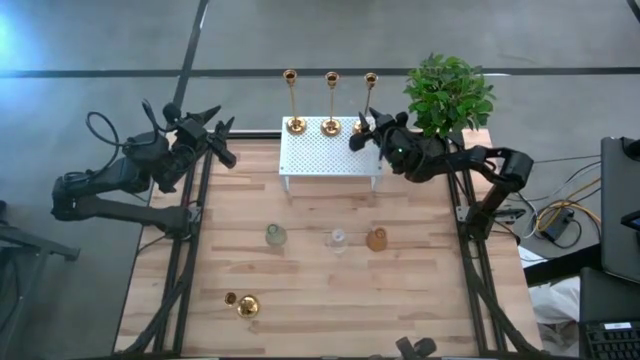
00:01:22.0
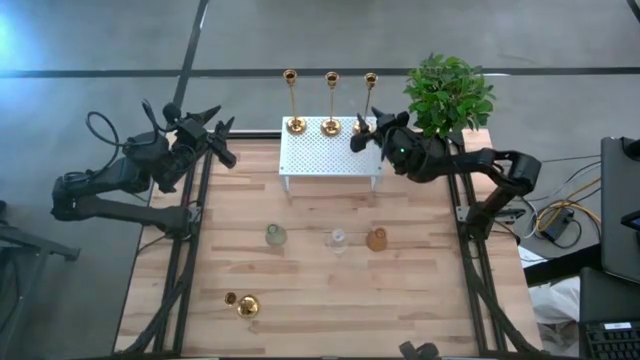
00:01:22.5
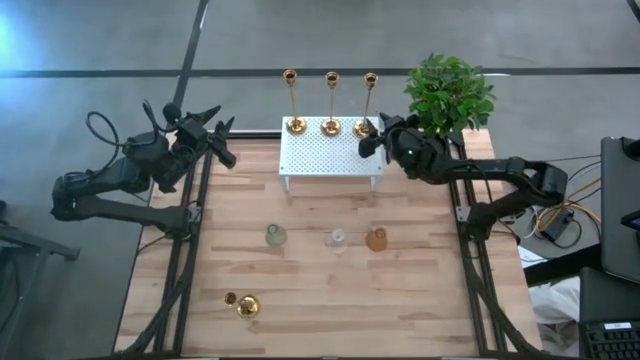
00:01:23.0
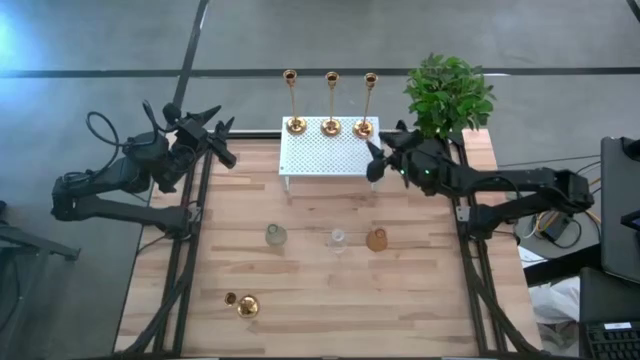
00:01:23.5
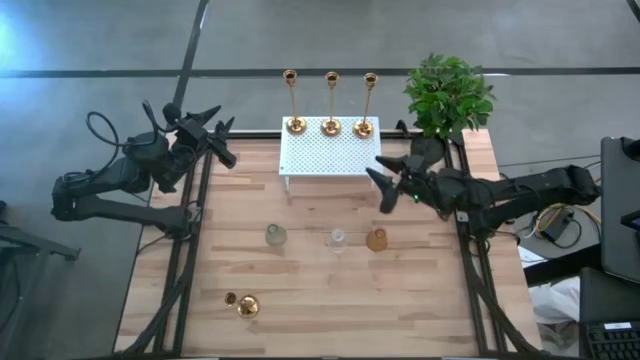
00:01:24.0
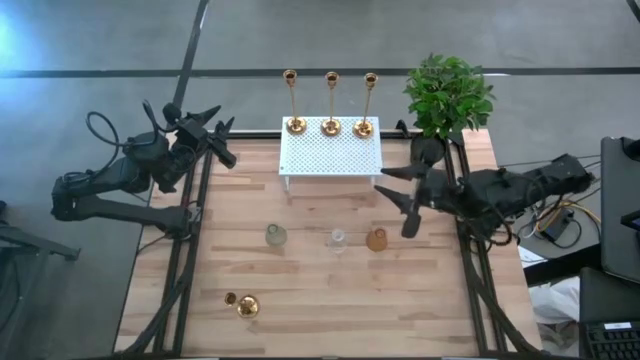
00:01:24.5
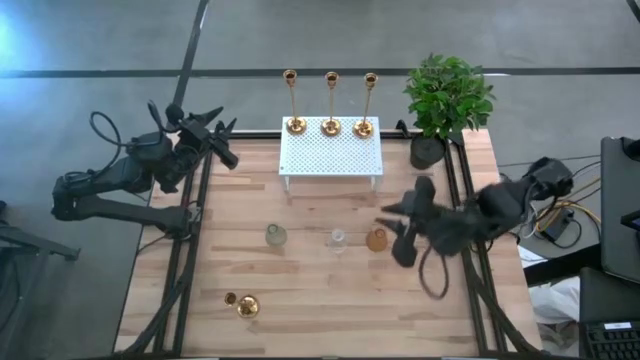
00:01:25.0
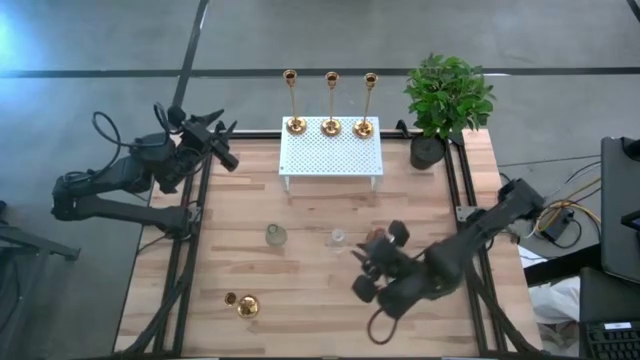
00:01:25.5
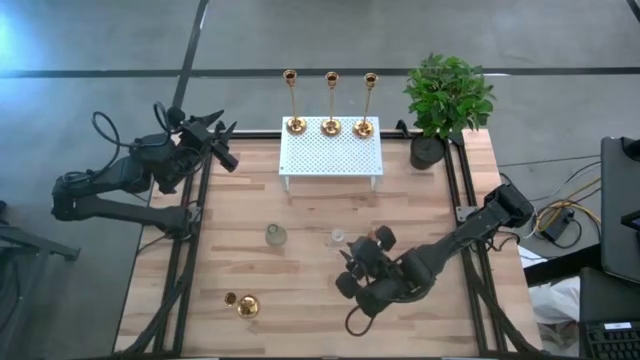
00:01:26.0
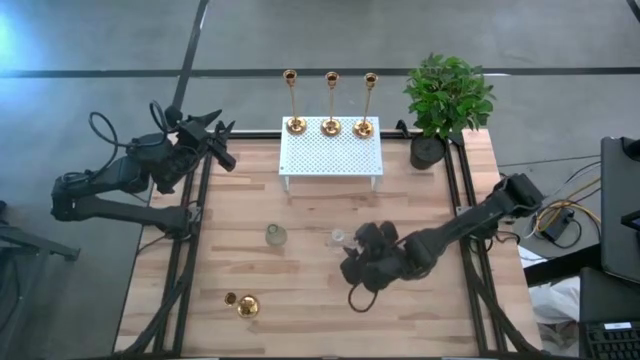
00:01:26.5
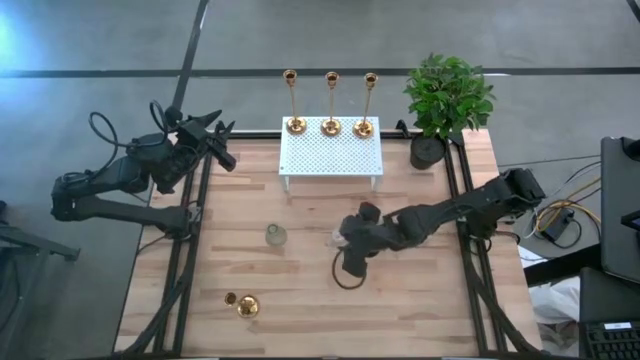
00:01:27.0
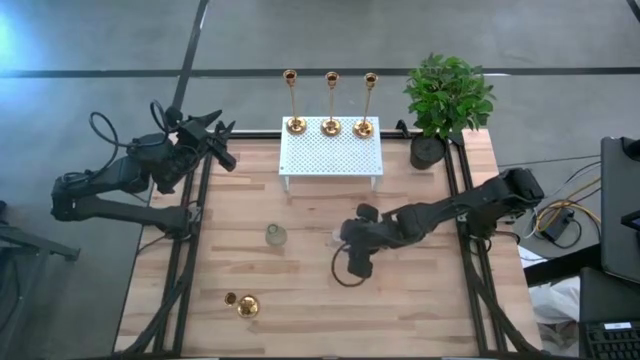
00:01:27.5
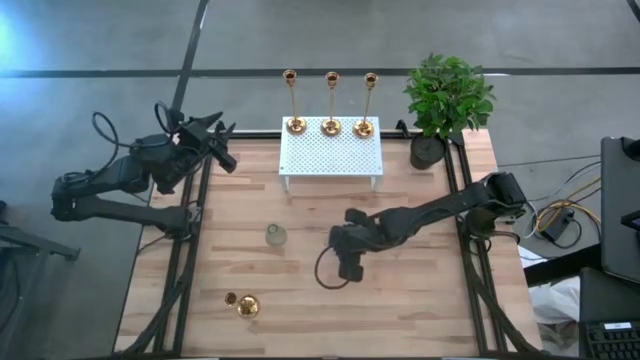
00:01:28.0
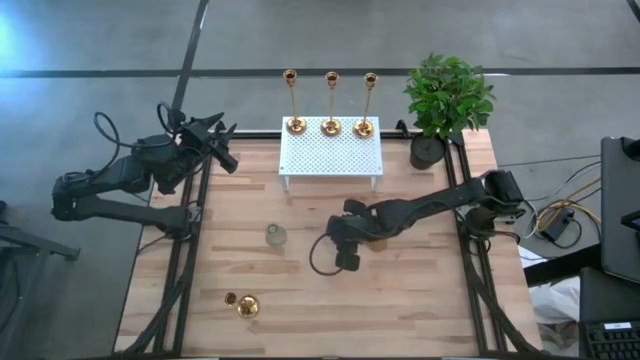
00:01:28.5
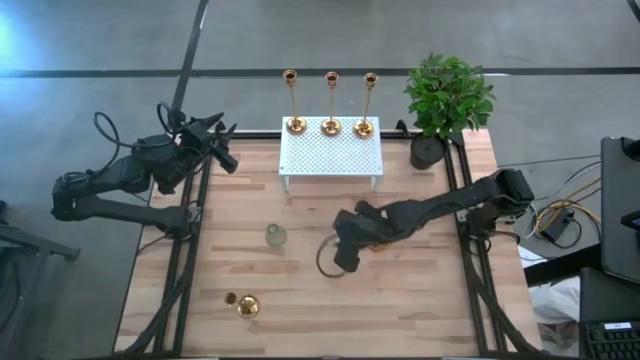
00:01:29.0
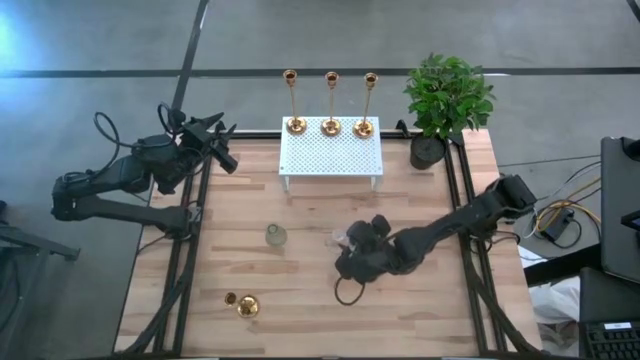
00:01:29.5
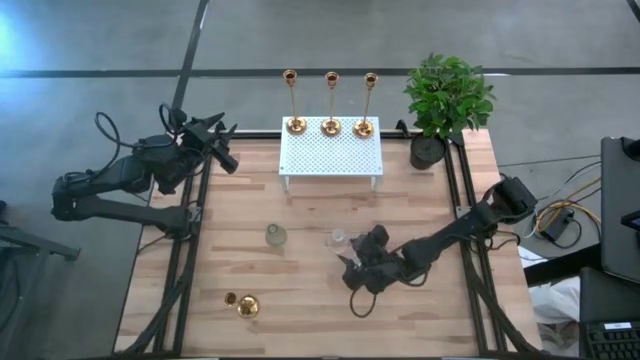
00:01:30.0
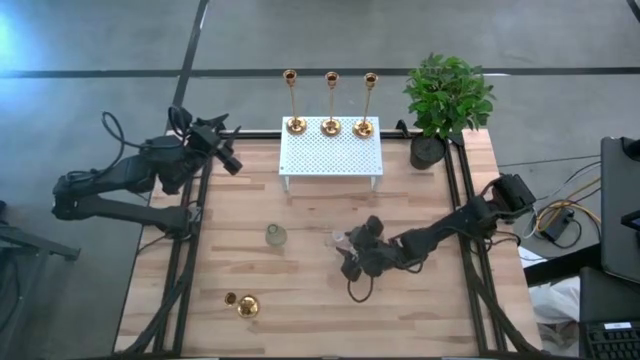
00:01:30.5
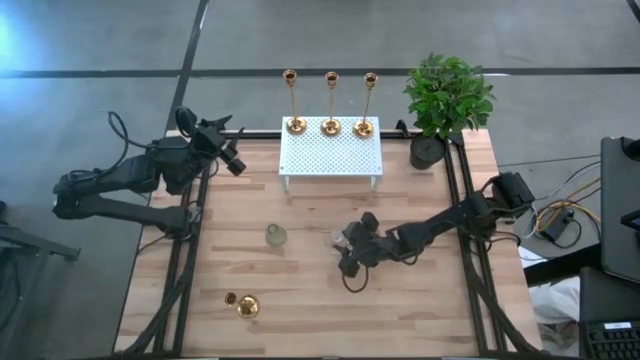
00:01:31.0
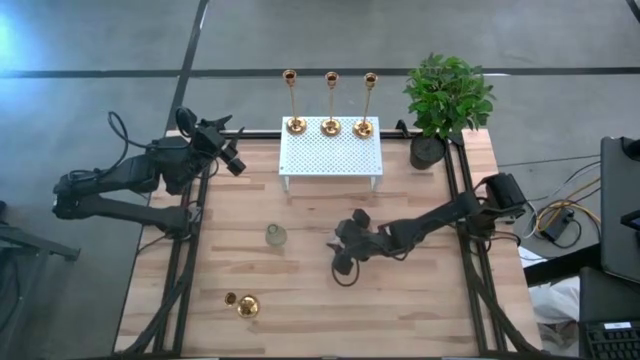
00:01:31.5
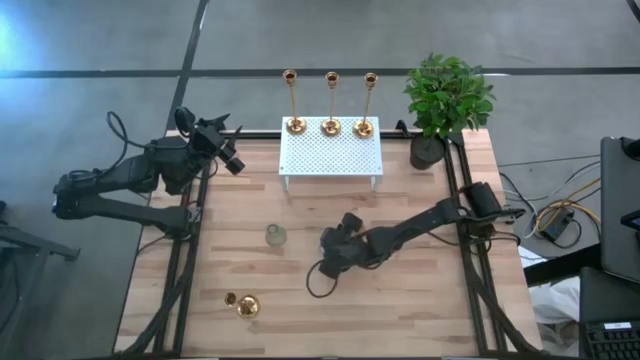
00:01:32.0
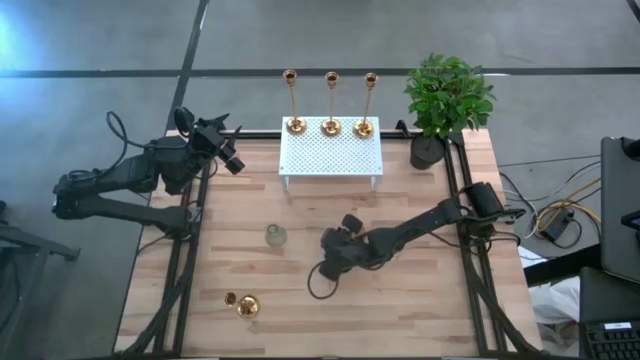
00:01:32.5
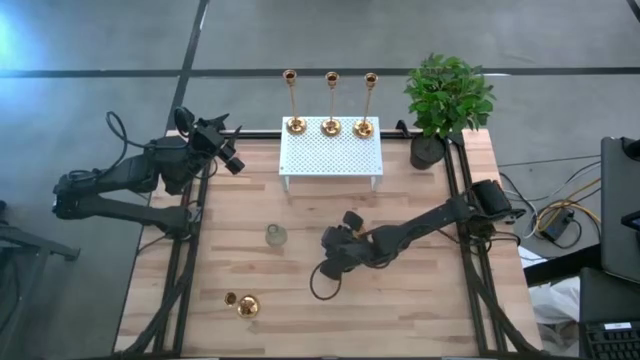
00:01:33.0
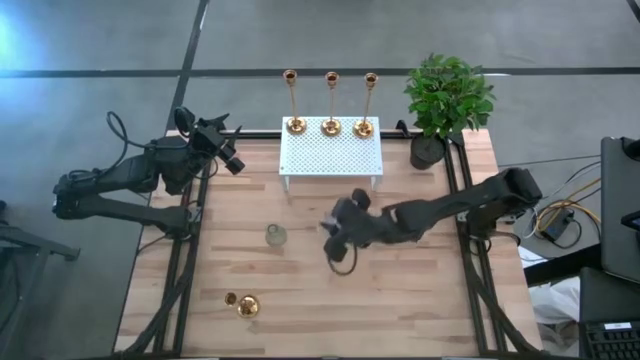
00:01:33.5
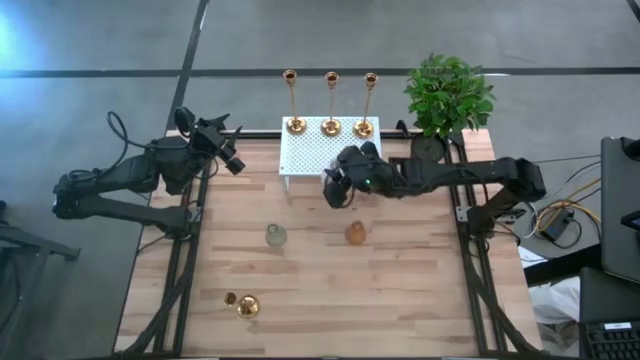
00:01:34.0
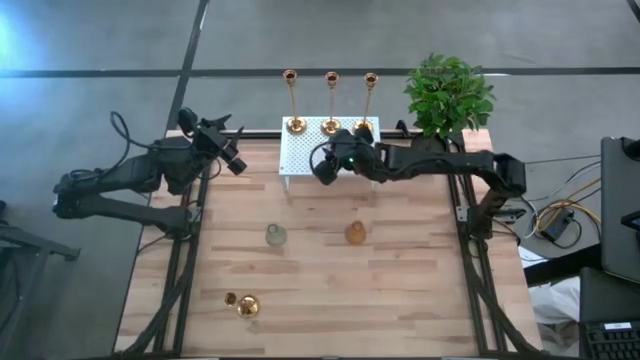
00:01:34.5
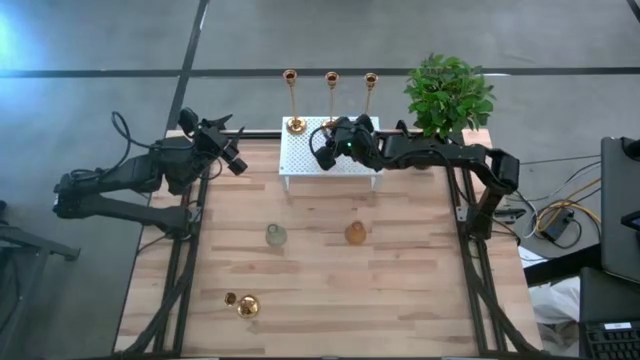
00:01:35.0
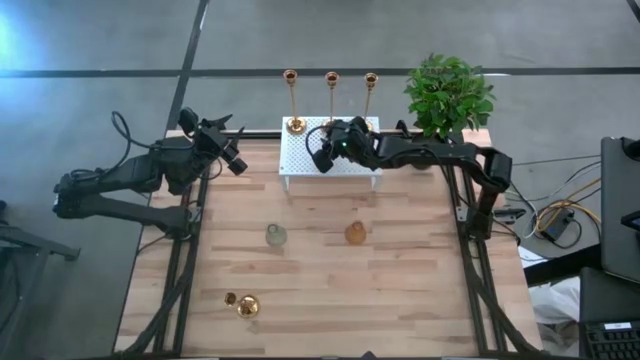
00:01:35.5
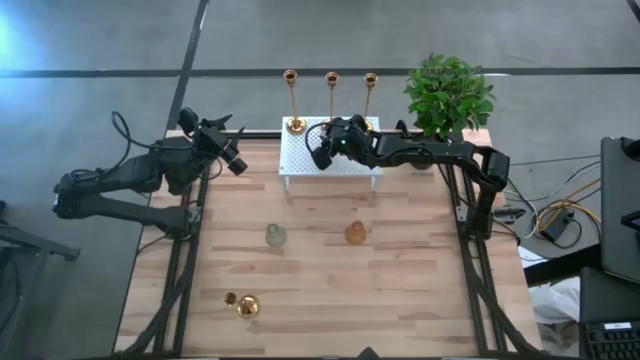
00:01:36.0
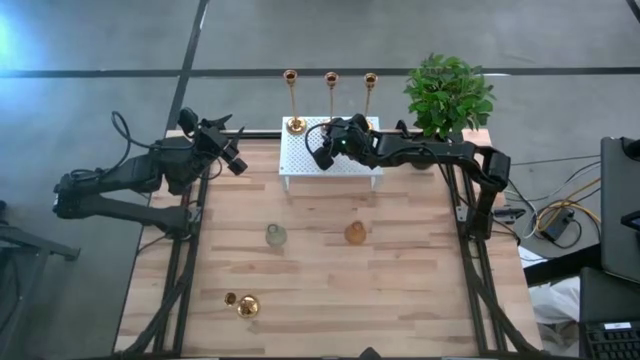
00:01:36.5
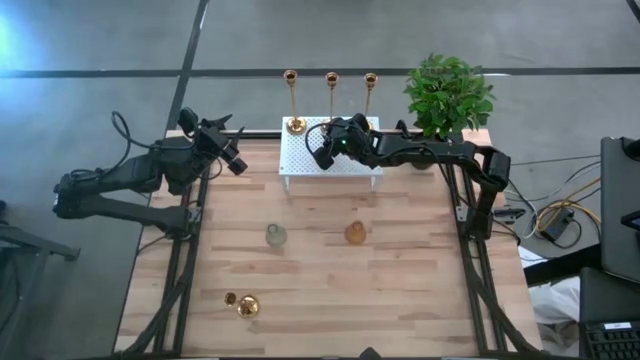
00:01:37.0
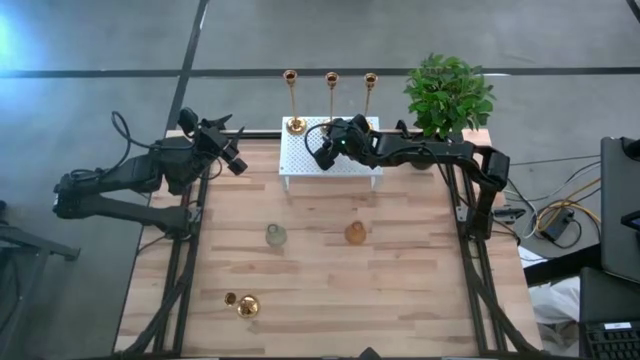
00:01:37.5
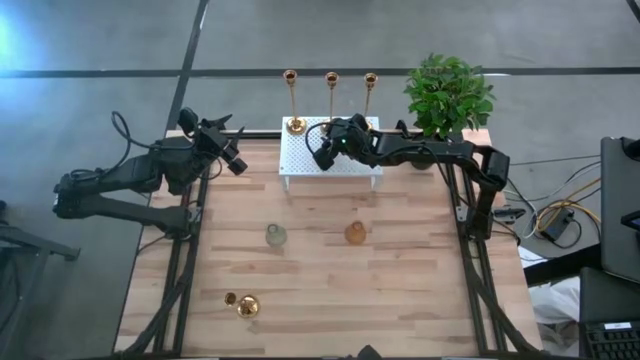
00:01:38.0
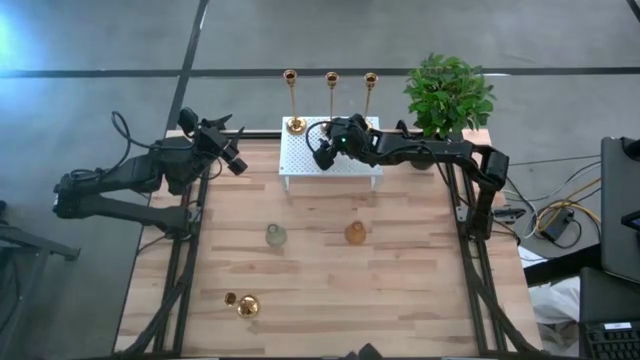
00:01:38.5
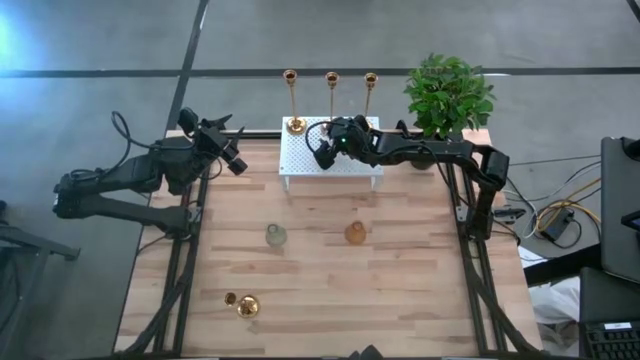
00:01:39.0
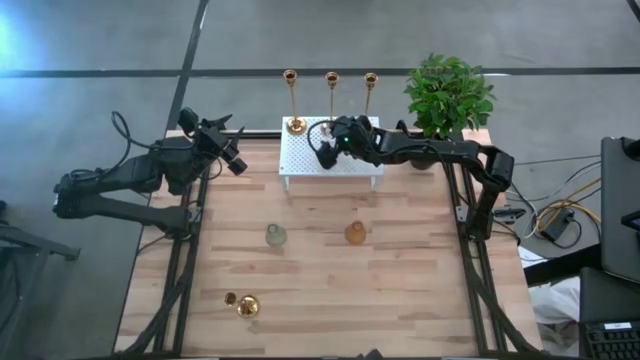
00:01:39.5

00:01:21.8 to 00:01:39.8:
Task: Pick & Place candle stick holders
Put the transparent glass candle holder on the shelf

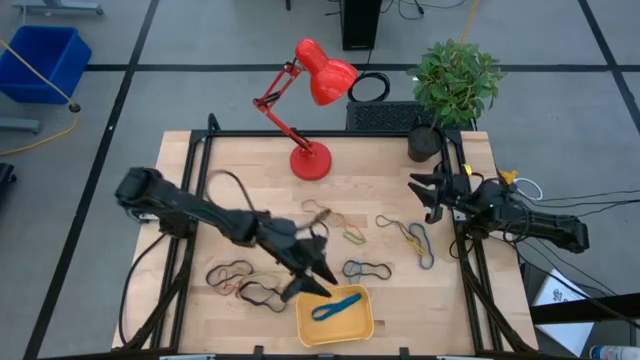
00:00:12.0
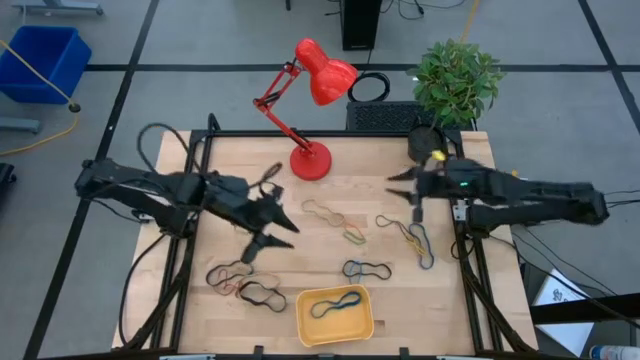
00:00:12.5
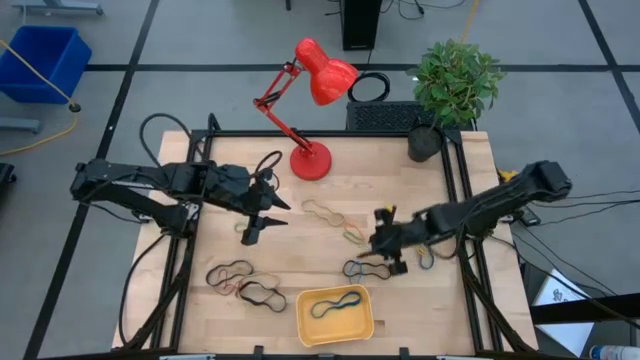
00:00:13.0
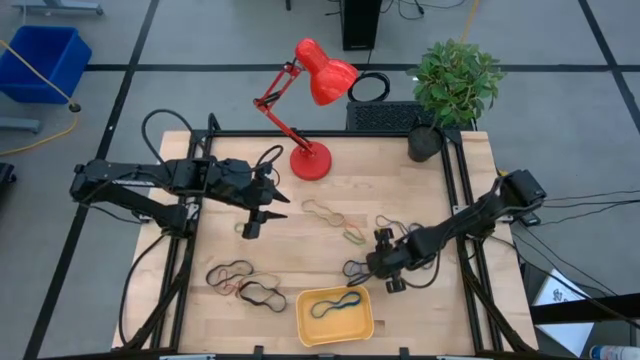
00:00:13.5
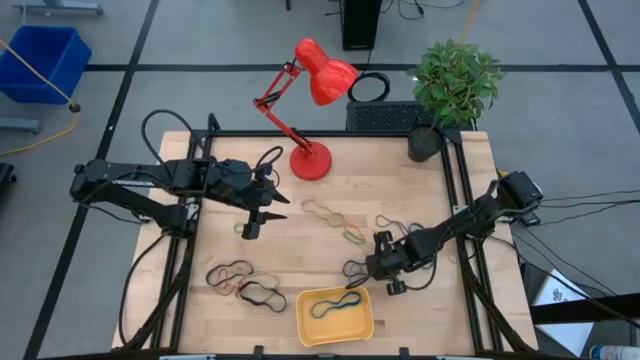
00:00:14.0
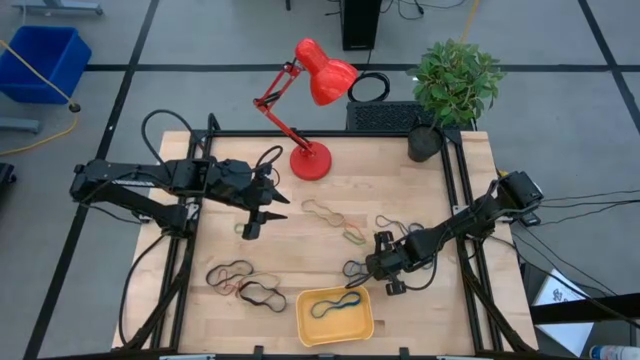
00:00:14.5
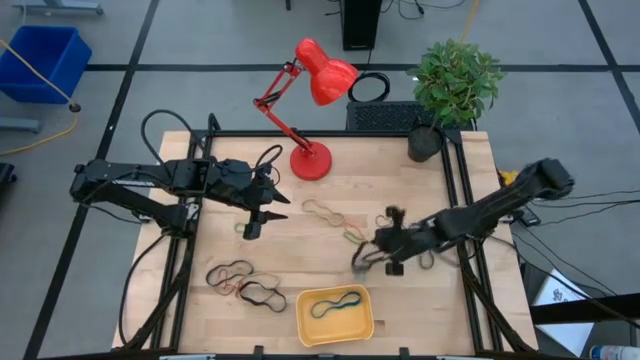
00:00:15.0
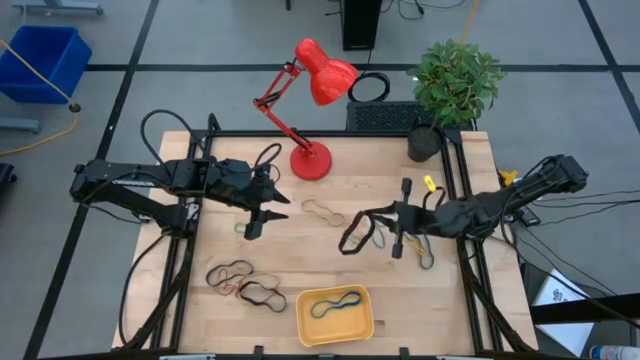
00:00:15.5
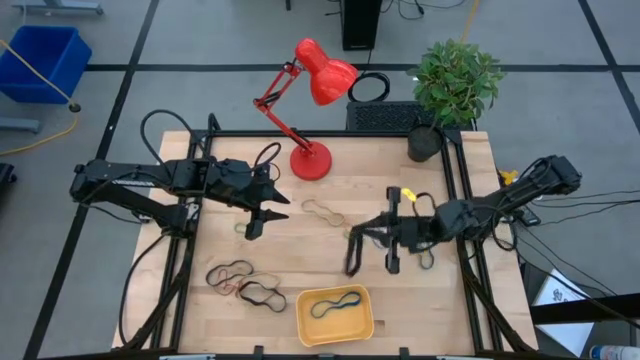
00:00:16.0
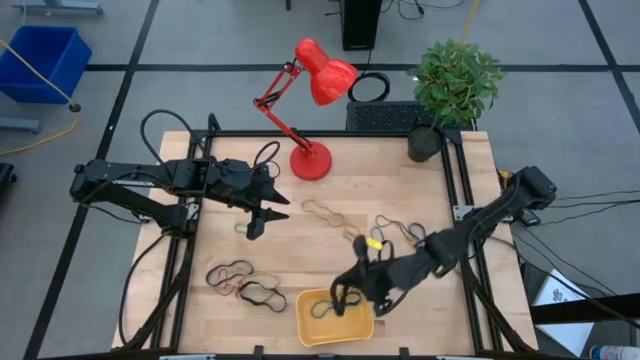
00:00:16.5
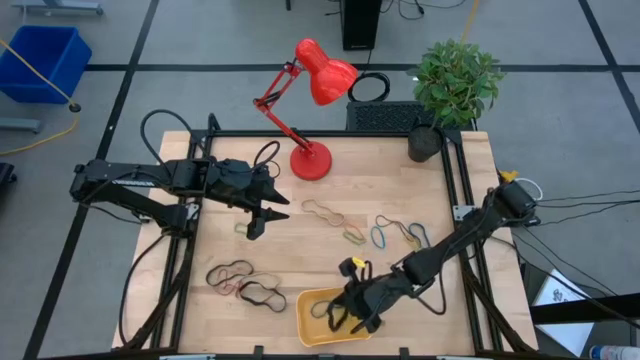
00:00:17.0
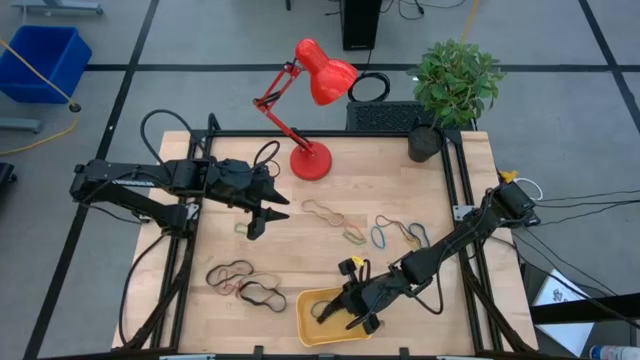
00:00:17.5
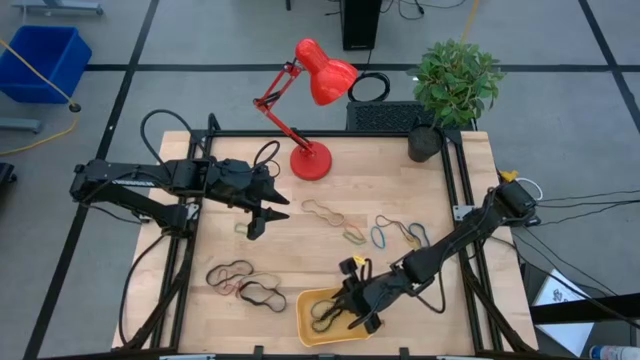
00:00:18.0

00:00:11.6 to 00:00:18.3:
Task: Pick and place rubber bands into bin
Put the right black rubber band into the yellow bin
